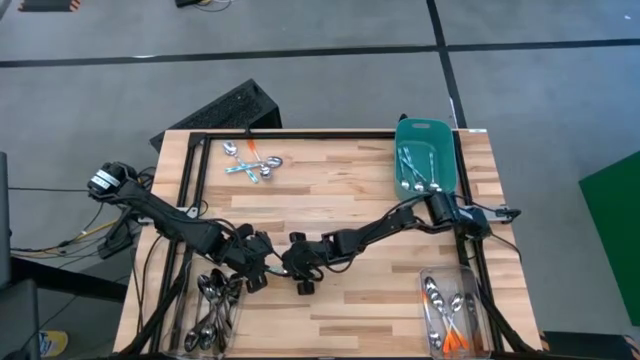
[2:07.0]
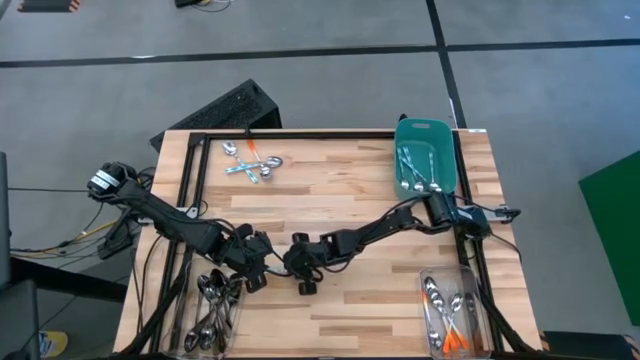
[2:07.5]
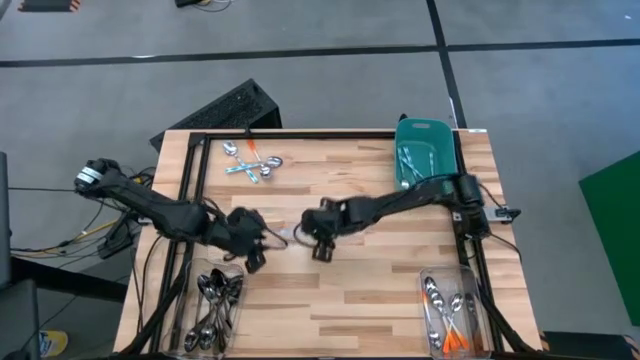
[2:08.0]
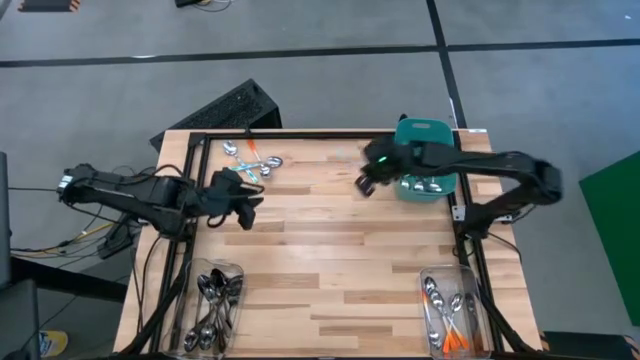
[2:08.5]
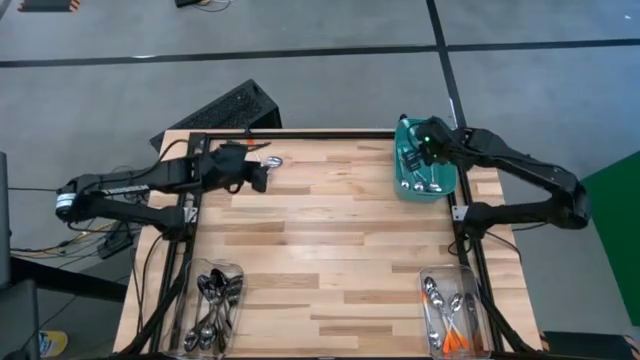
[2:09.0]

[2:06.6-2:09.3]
Task: Sort silverware by color (type)
Put the blue spoon into the blue bin

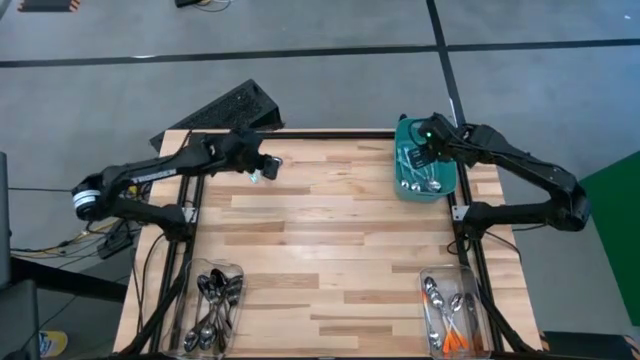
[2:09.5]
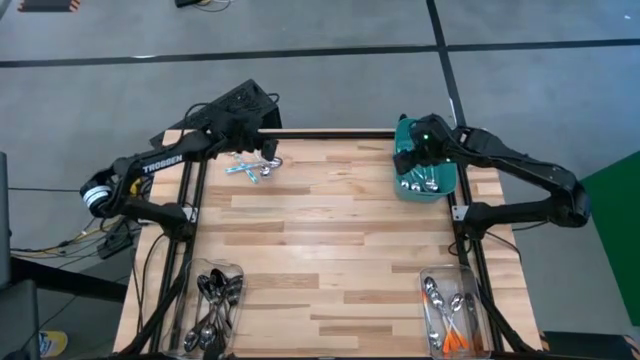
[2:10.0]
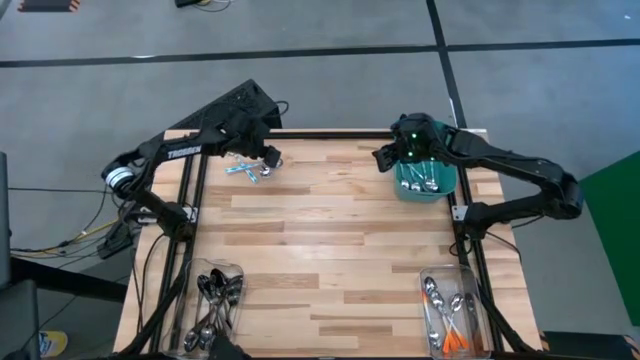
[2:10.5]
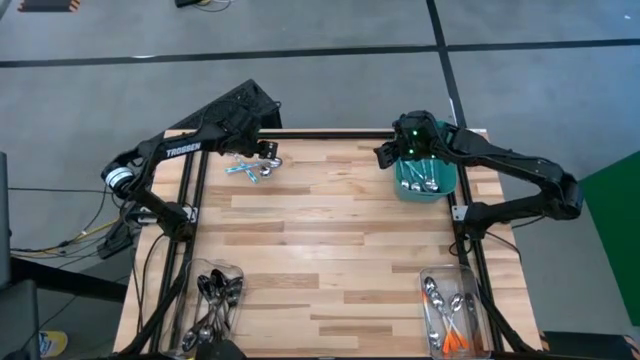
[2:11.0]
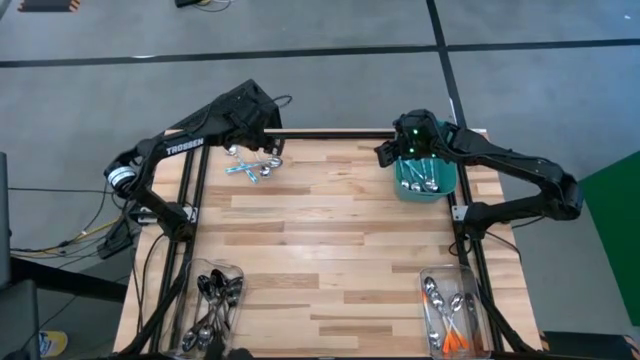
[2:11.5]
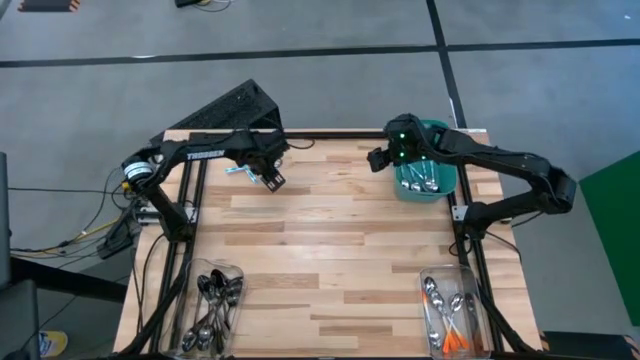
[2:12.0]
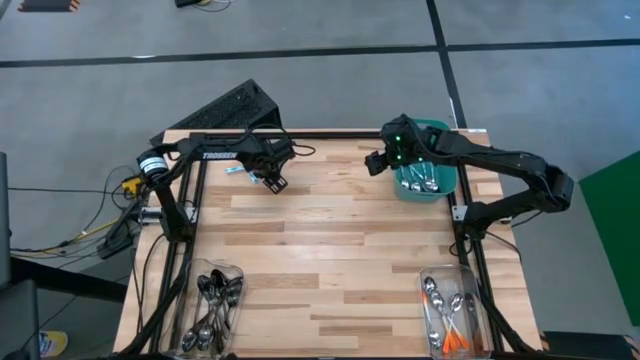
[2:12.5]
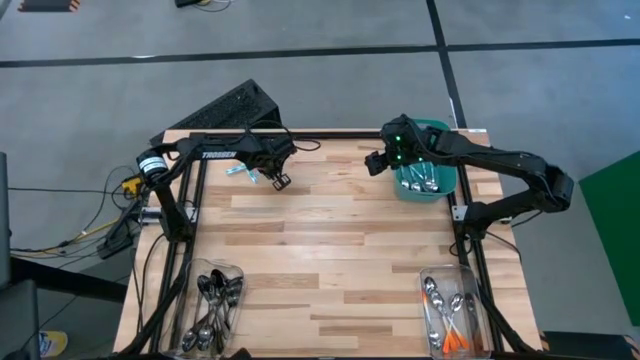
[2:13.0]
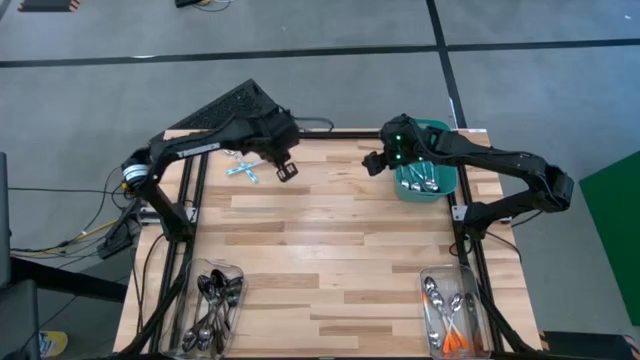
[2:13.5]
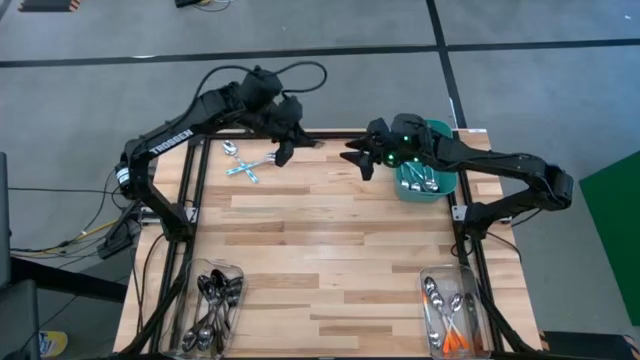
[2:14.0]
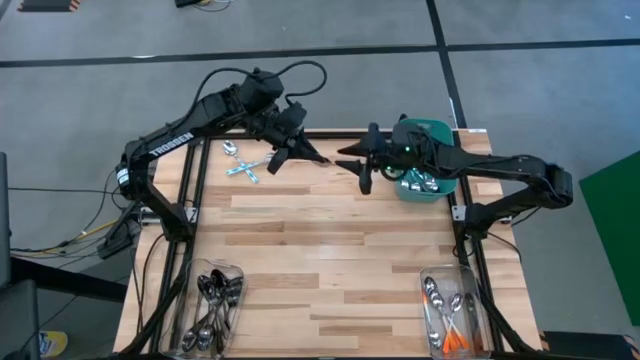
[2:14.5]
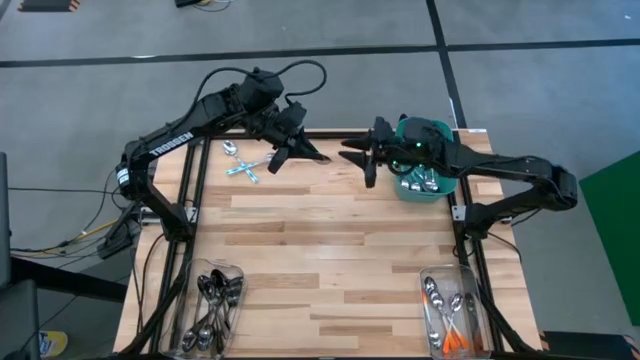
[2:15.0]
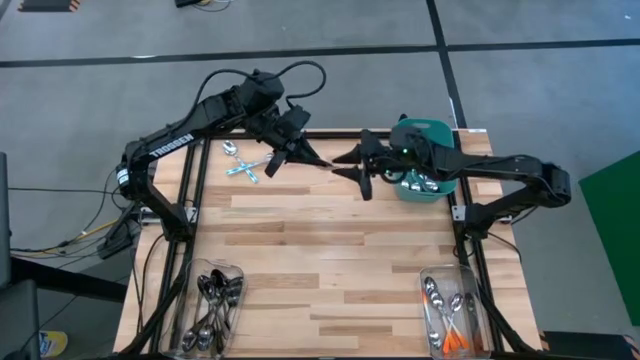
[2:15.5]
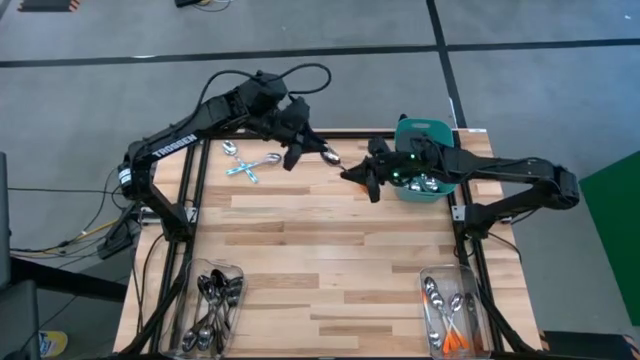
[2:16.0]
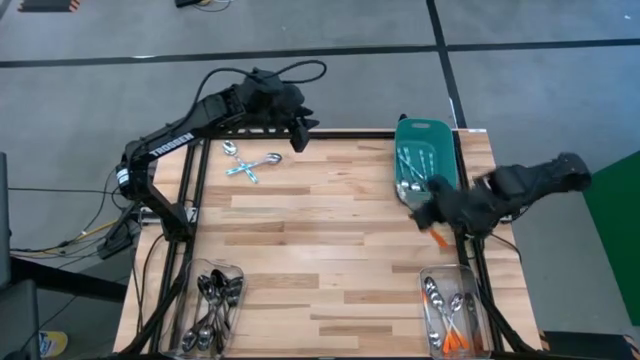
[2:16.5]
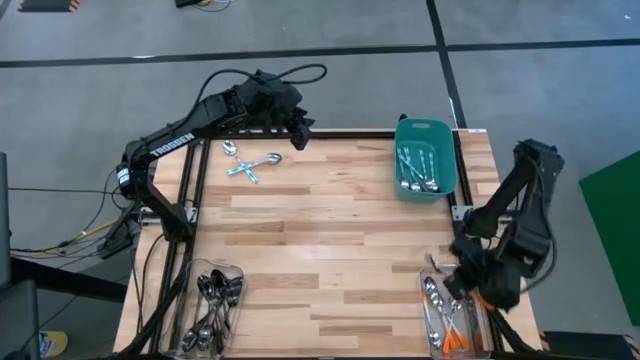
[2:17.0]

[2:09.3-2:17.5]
Put the orange spoon into the right transparent bin

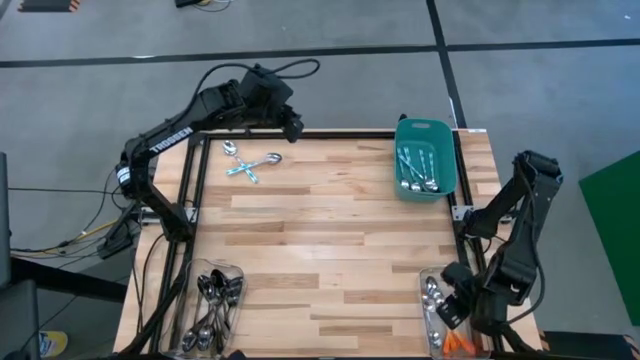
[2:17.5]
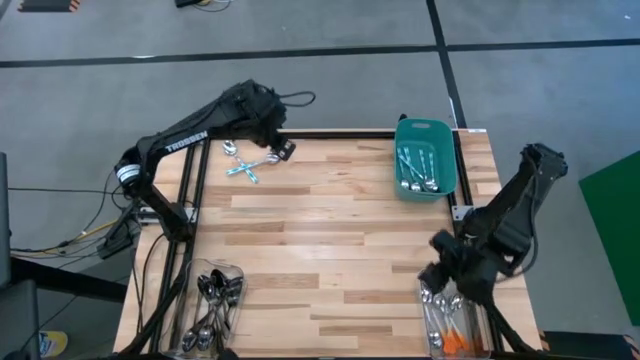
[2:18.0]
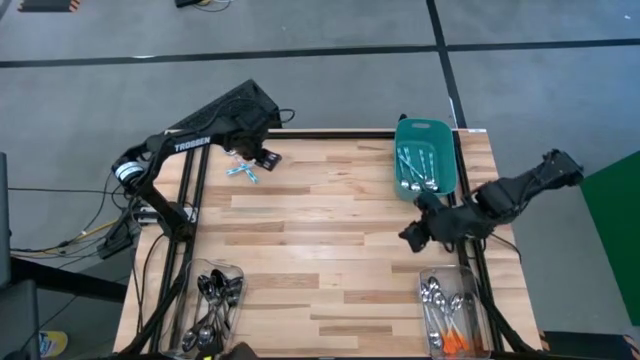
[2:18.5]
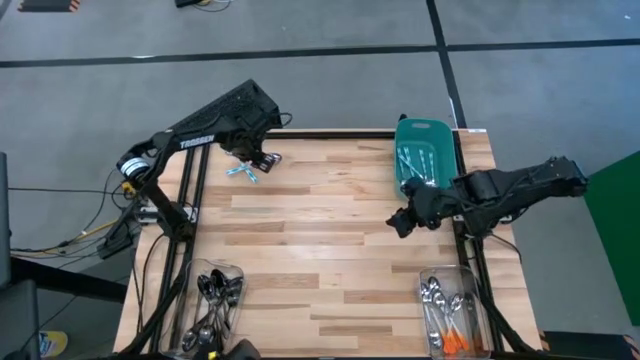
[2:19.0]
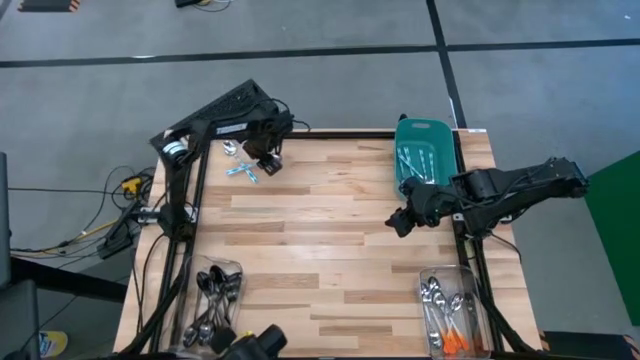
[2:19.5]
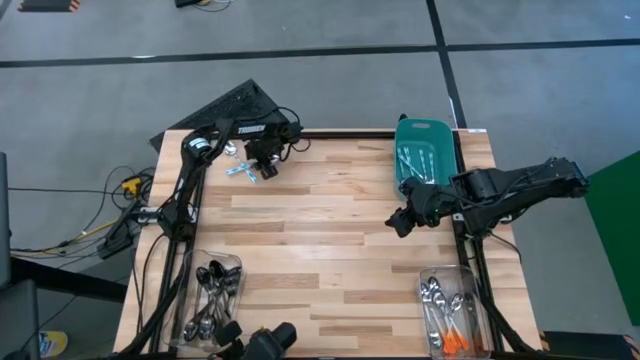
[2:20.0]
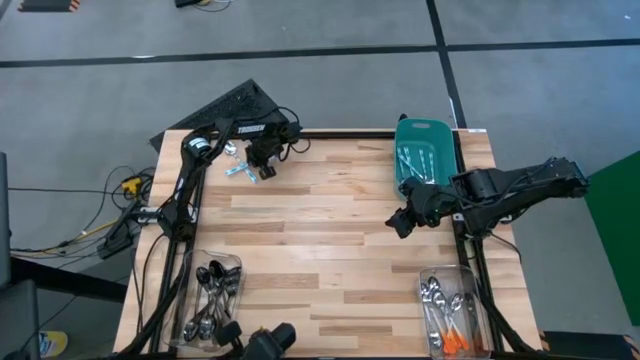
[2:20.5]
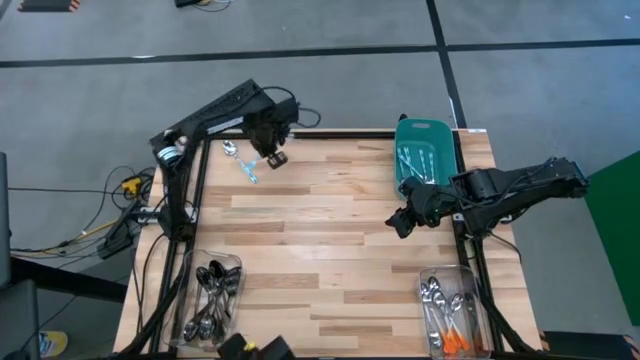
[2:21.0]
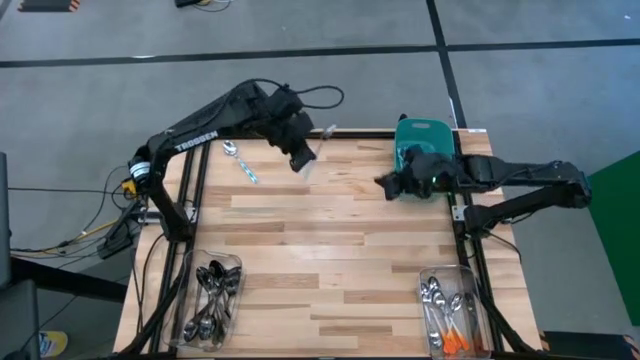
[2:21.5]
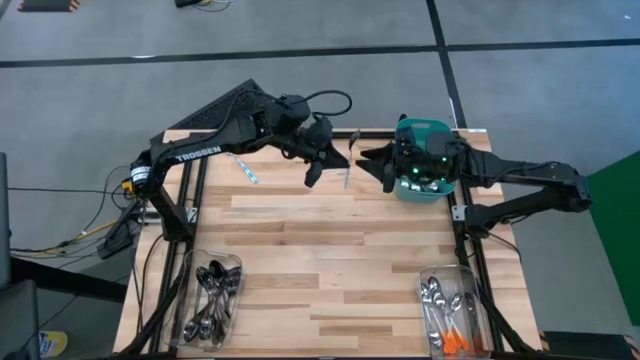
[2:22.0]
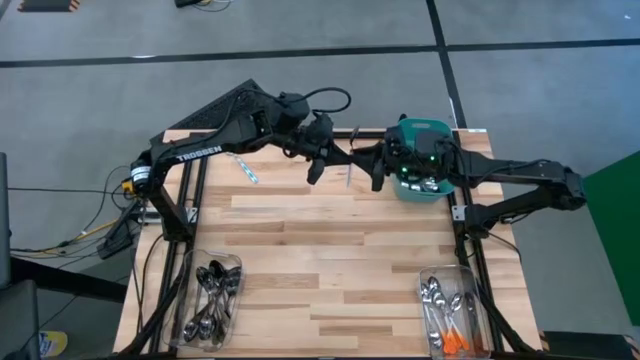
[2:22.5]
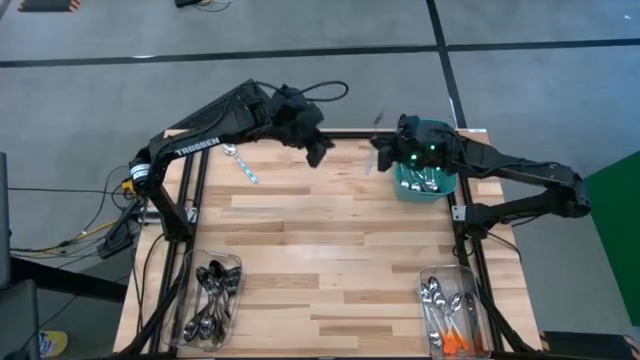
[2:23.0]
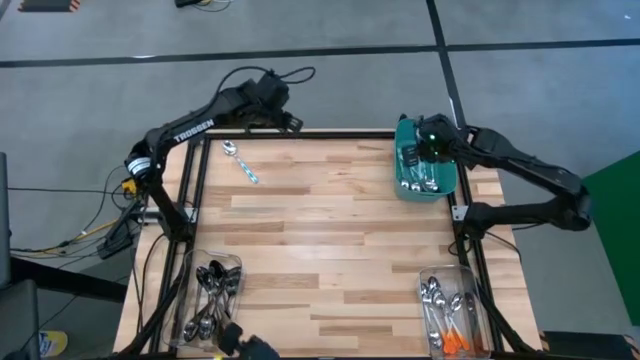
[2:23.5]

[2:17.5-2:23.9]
Put the blue spoon in the blue bin

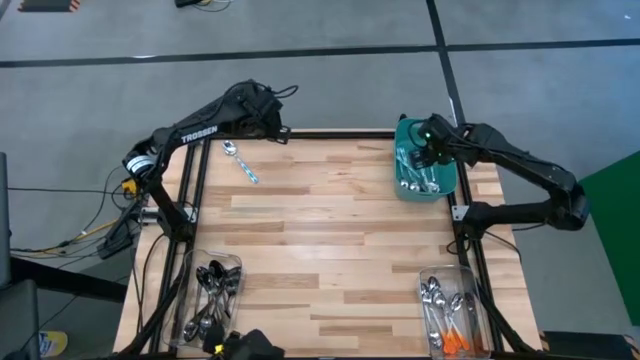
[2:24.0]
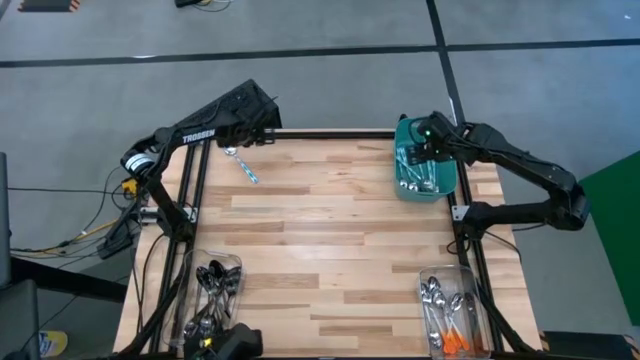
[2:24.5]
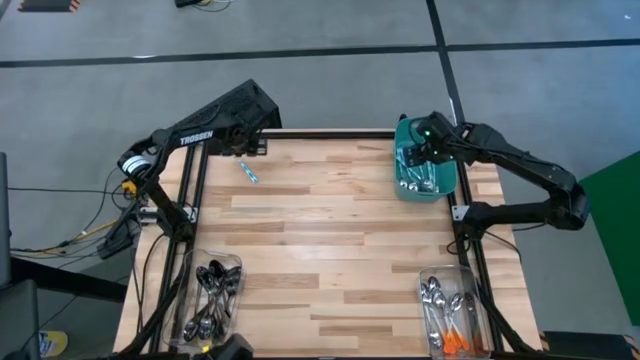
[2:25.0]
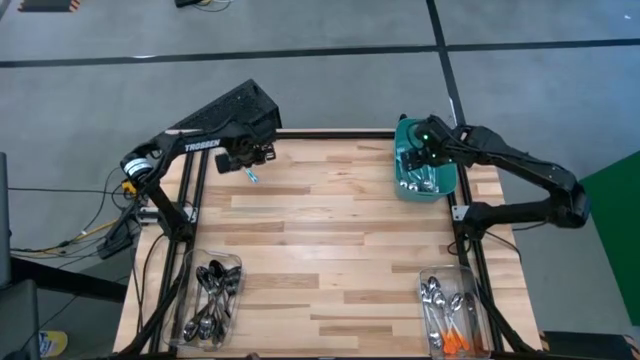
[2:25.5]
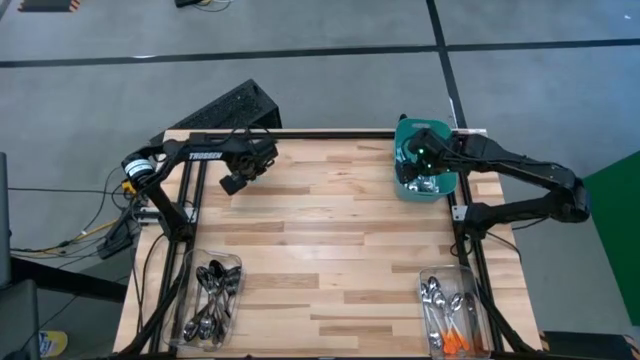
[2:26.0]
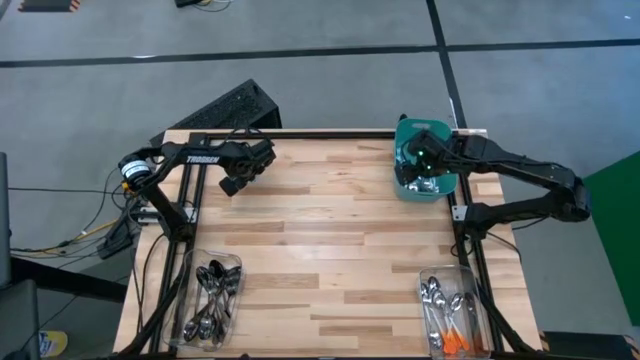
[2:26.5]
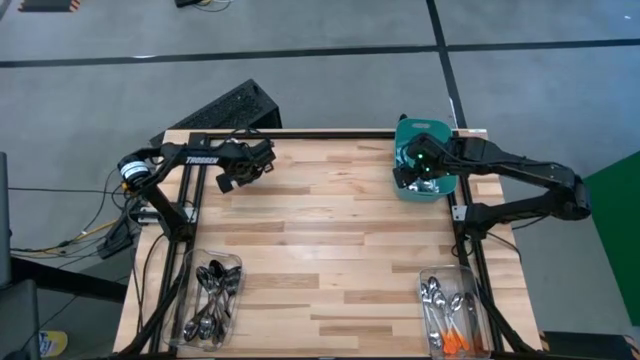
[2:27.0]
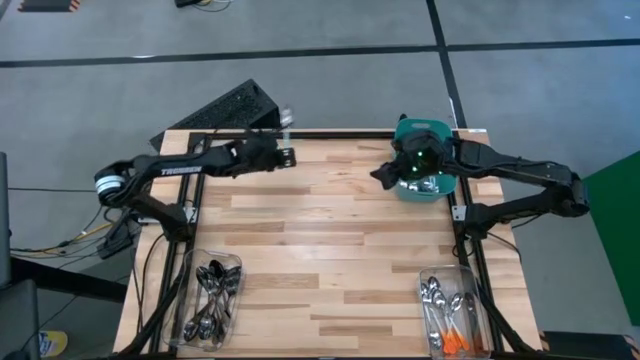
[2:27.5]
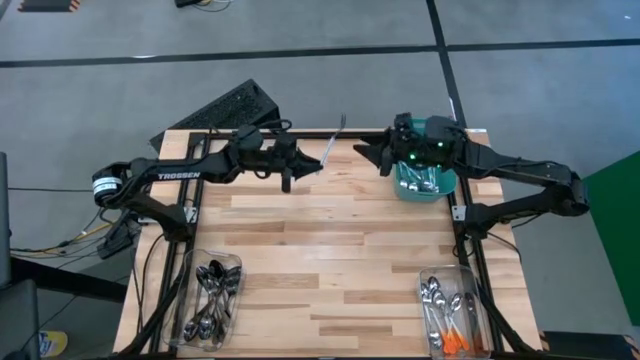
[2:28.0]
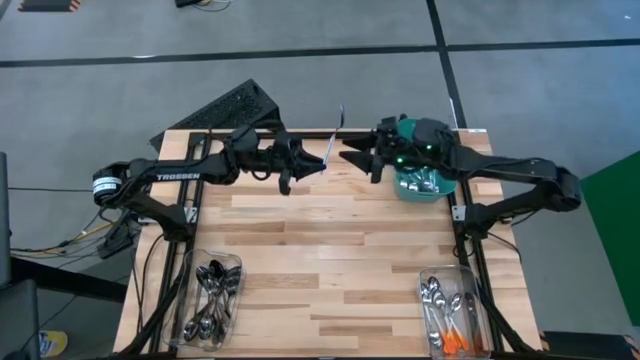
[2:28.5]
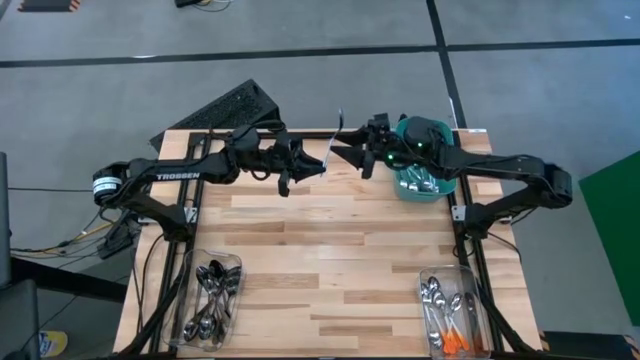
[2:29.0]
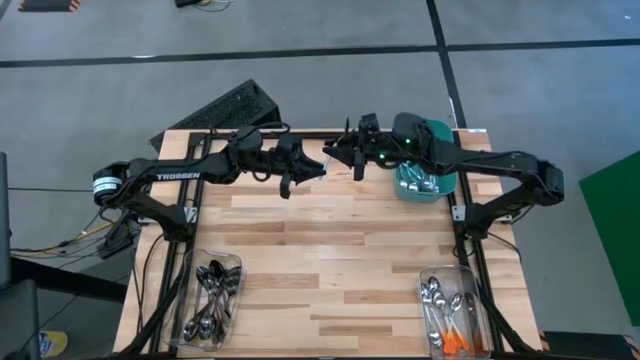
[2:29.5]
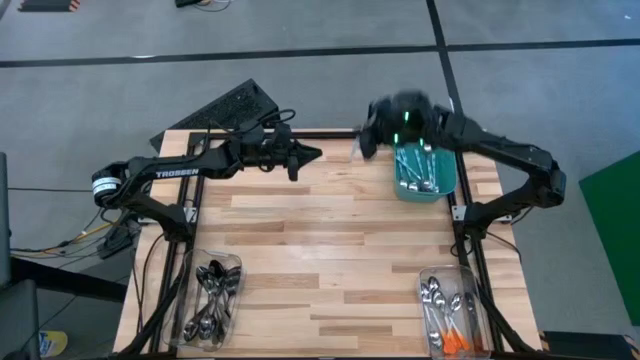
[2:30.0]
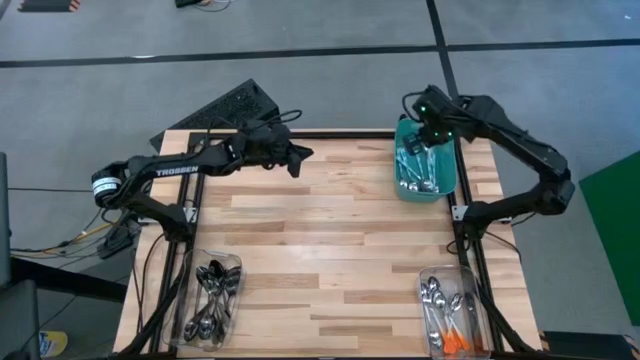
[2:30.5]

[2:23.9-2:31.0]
Put the blue spoon in the blue bin
